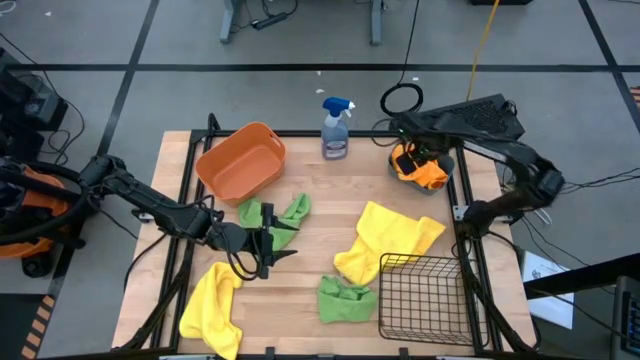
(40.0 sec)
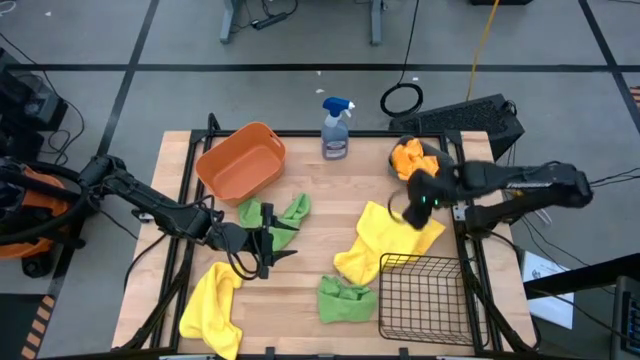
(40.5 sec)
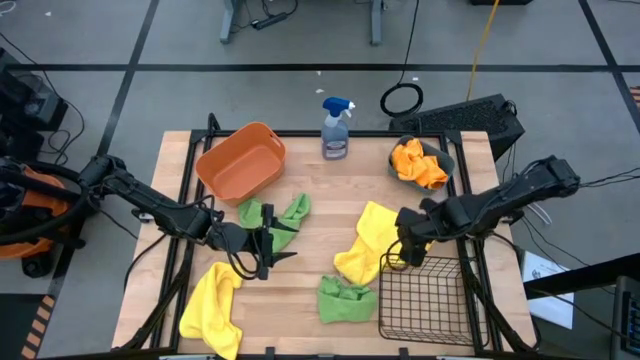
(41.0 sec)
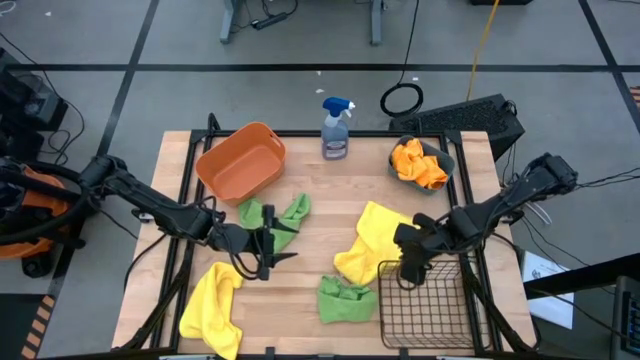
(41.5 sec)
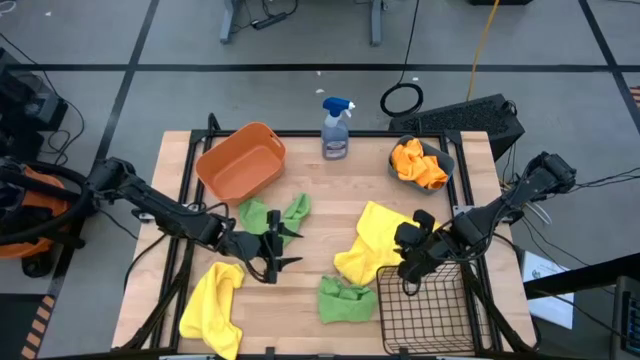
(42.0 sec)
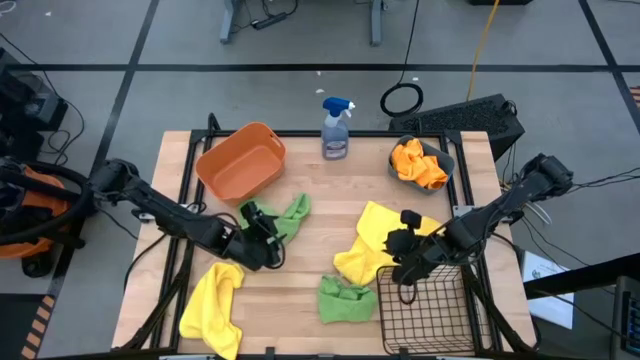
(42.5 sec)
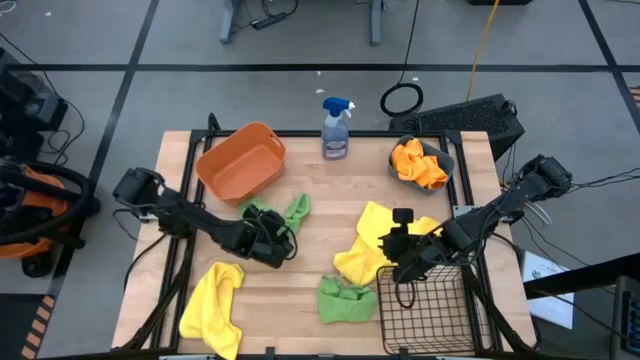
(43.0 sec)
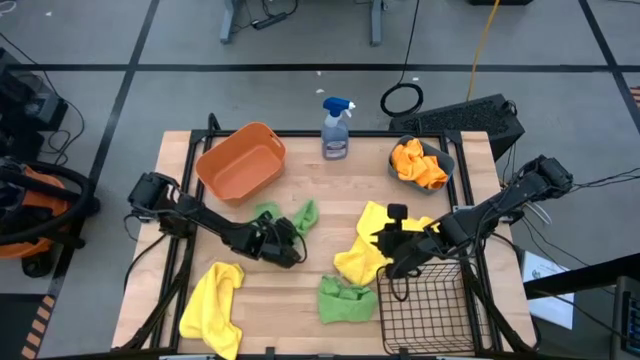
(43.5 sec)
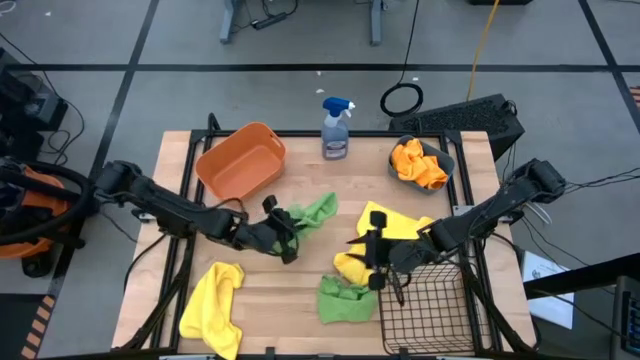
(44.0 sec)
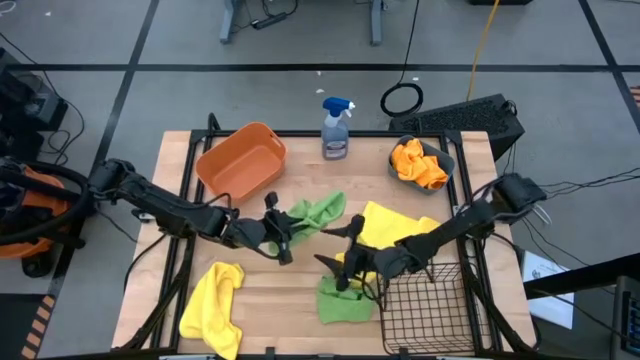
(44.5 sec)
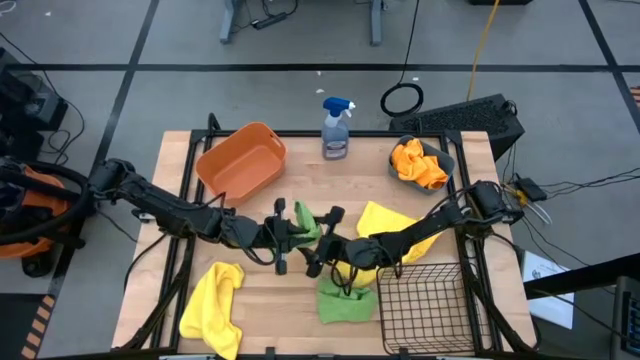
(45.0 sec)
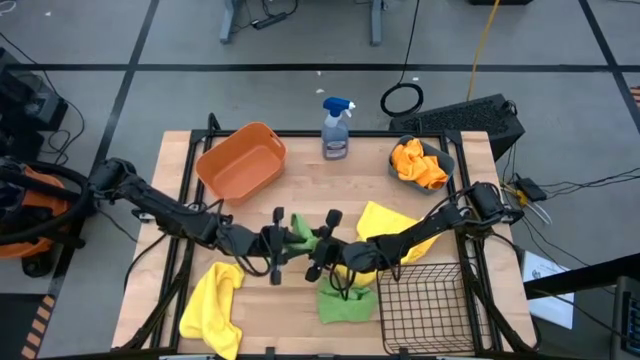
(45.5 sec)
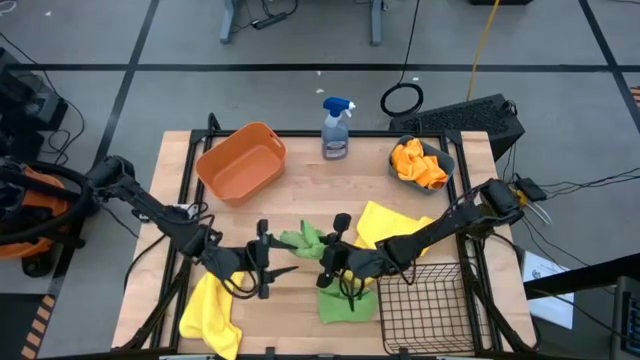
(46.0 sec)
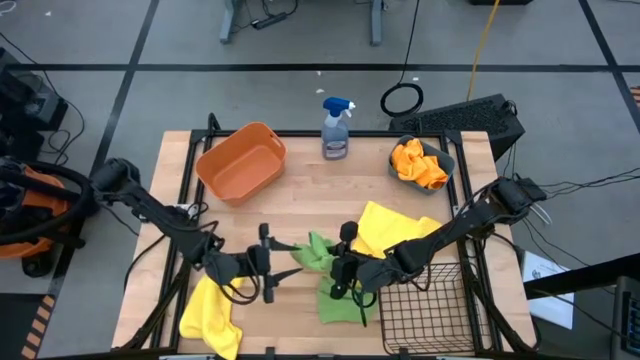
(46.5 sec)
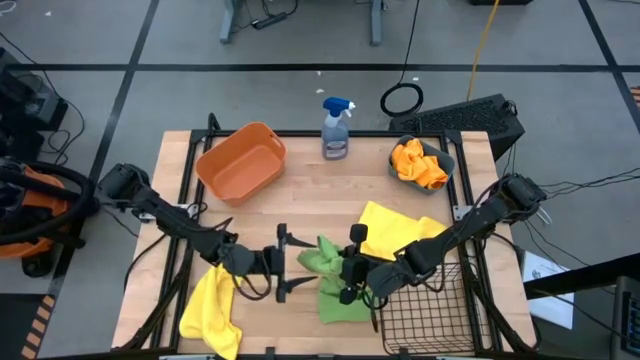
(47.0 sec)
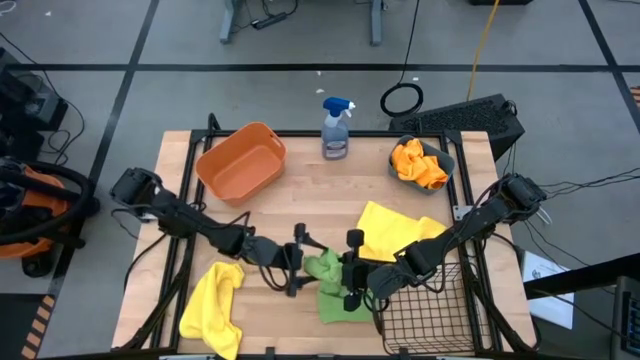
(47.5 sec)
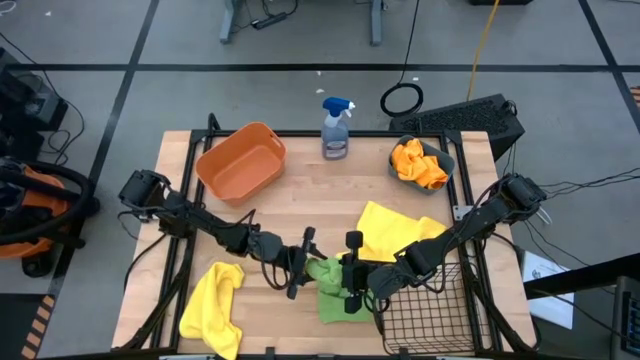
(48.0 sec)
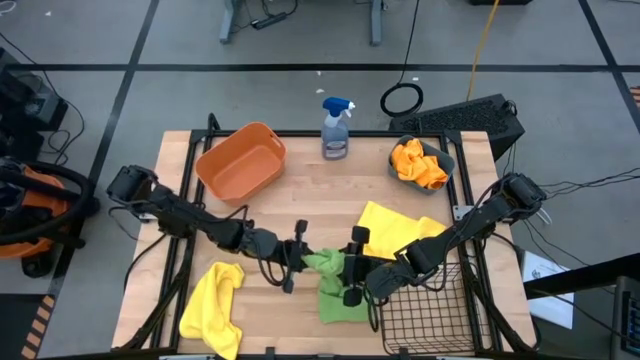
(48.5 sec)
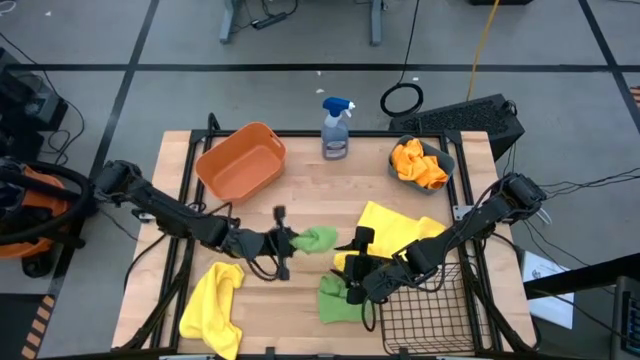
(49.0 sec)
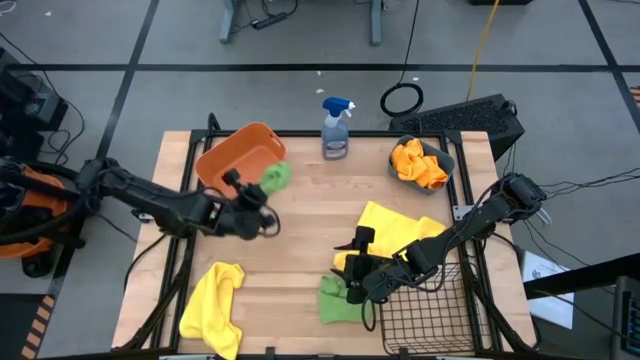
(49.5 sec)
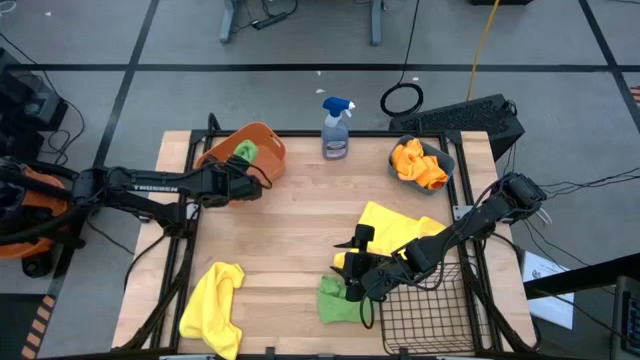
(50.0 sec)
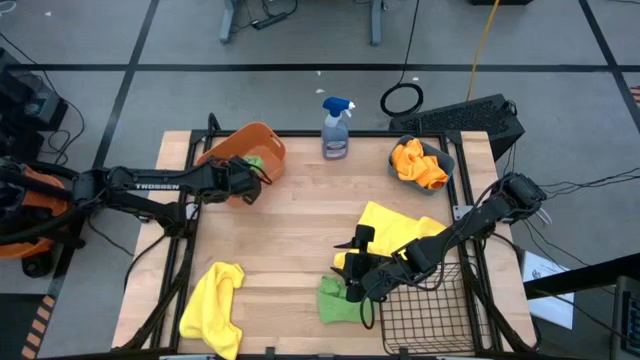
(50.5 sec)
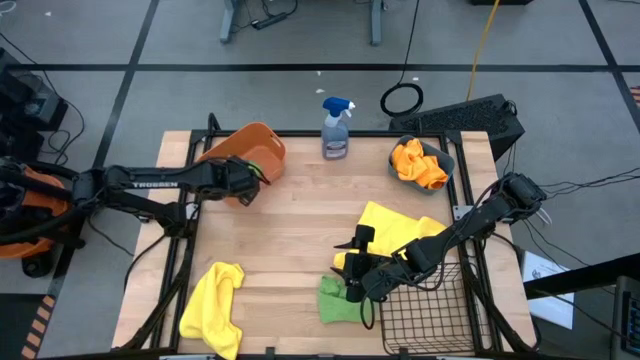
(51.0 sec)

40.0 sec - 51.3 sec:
Task: Sort microfiber towel by color & place in baskets
Put the left green microfiber towel into the orange bin

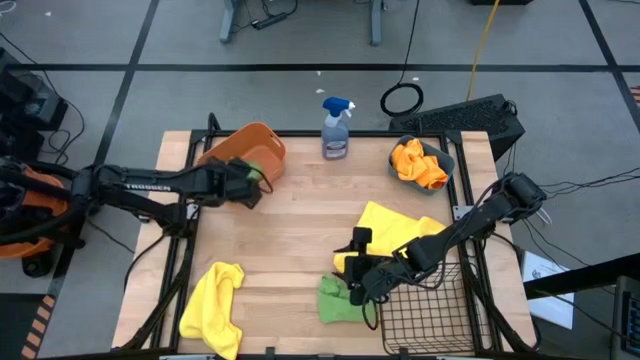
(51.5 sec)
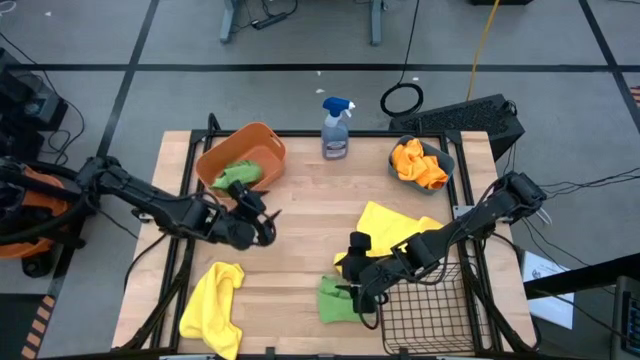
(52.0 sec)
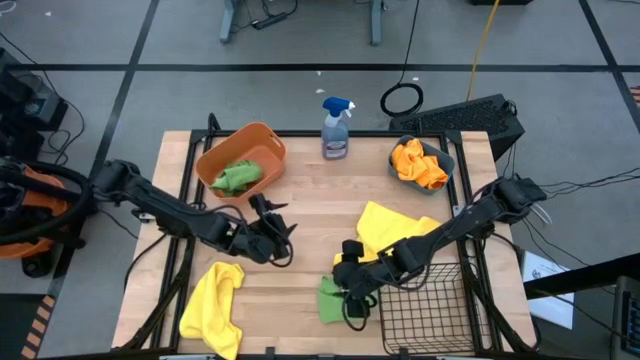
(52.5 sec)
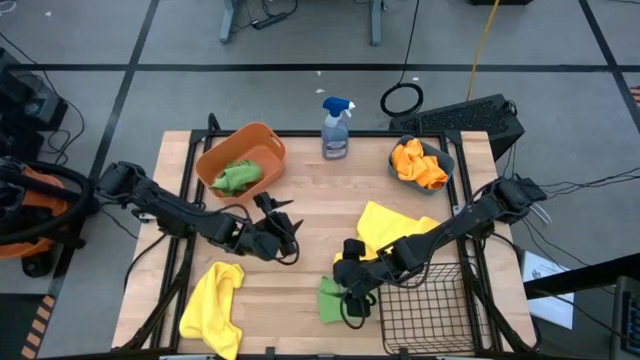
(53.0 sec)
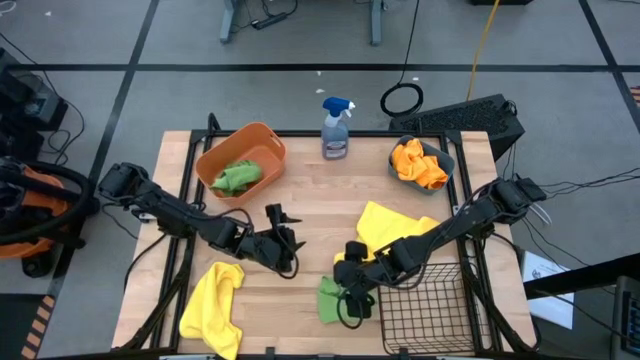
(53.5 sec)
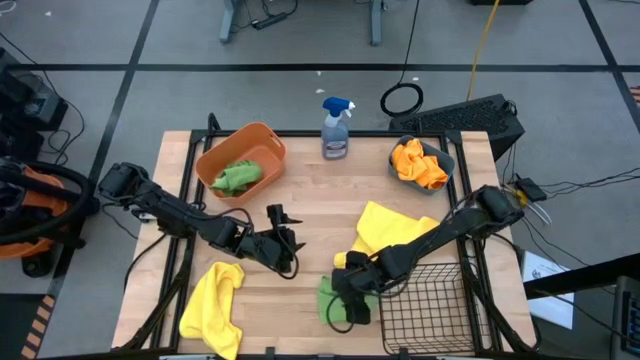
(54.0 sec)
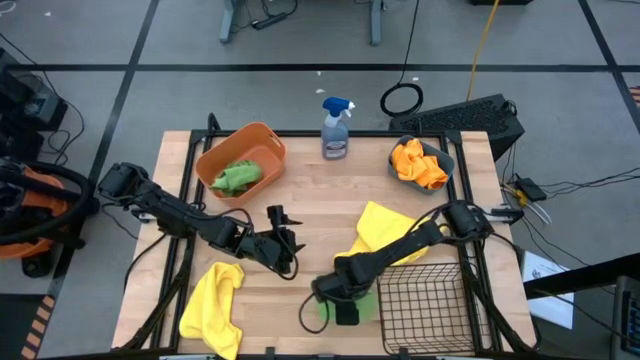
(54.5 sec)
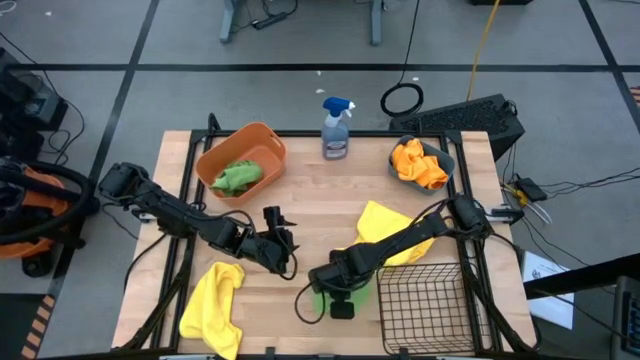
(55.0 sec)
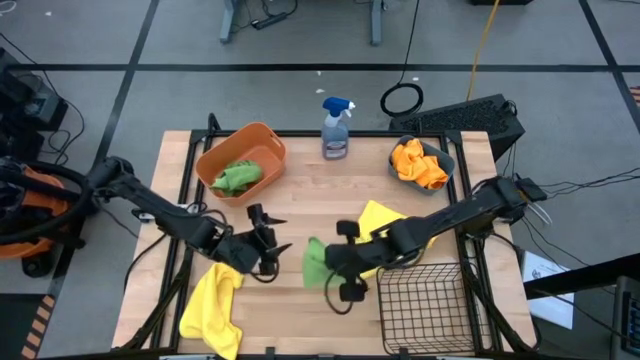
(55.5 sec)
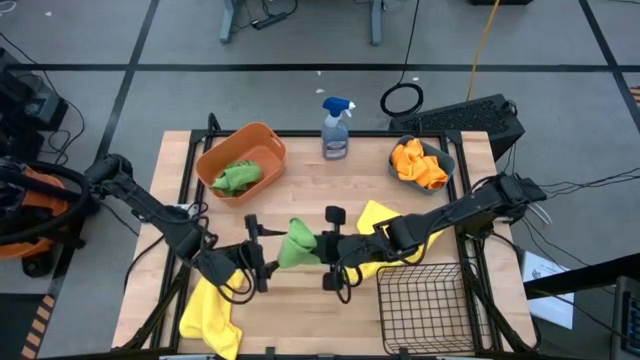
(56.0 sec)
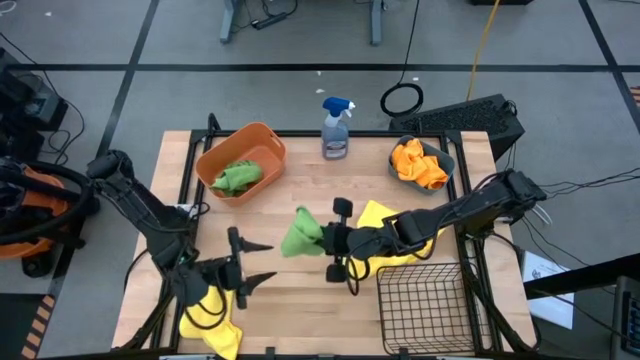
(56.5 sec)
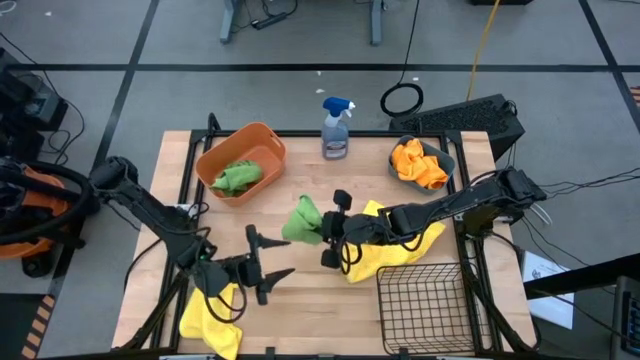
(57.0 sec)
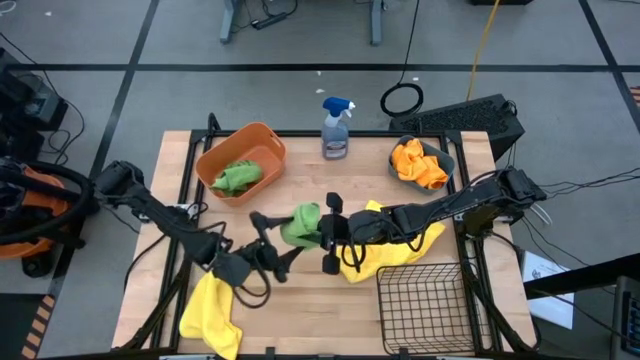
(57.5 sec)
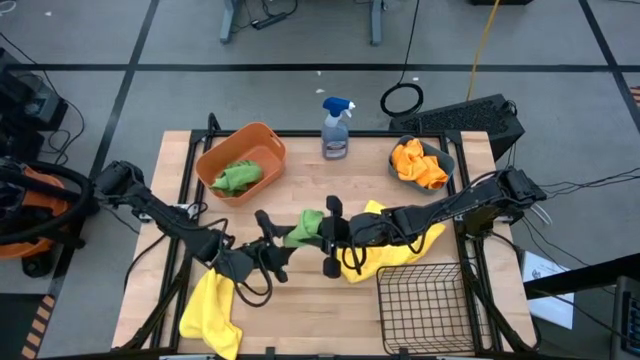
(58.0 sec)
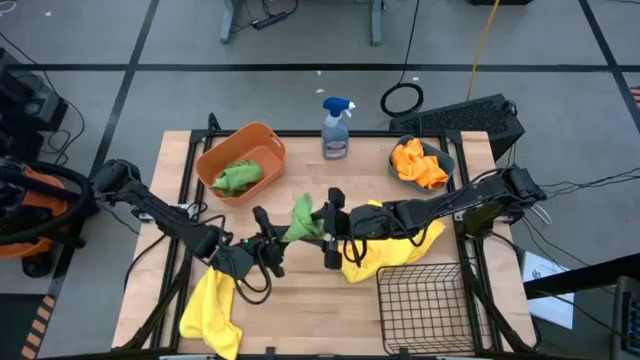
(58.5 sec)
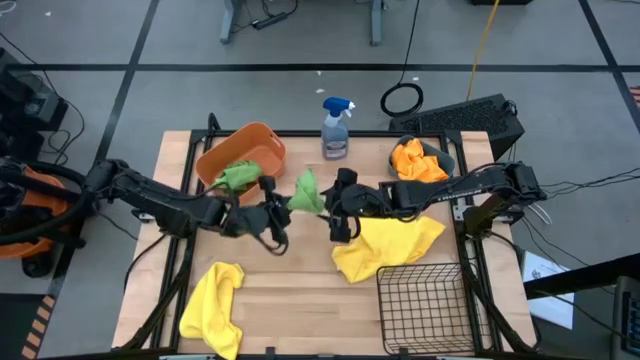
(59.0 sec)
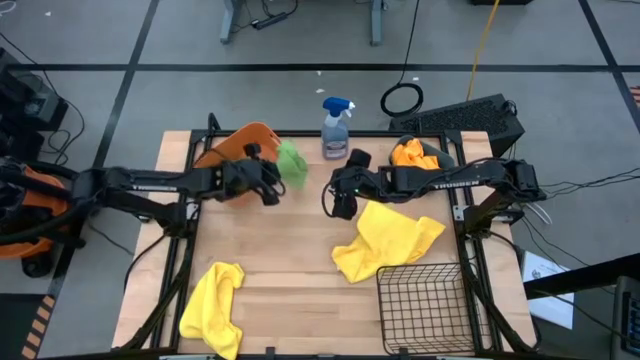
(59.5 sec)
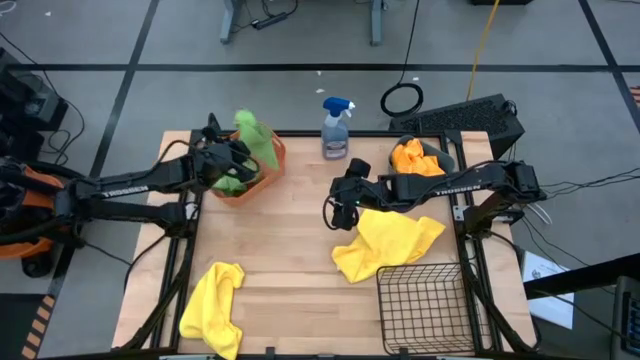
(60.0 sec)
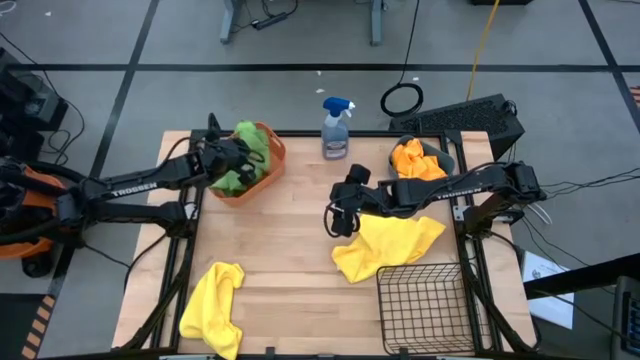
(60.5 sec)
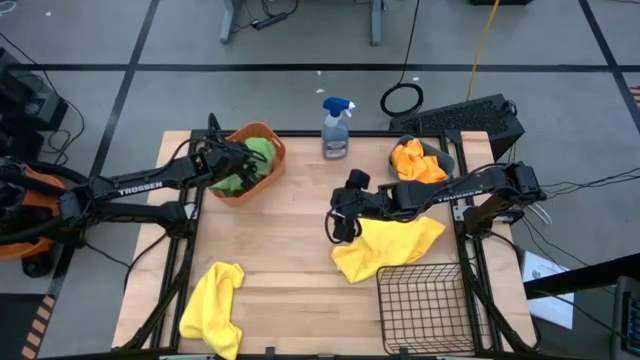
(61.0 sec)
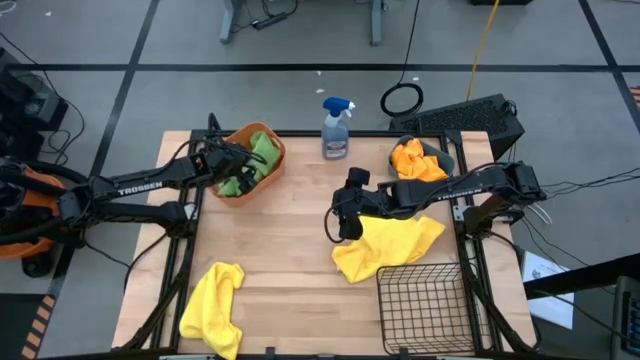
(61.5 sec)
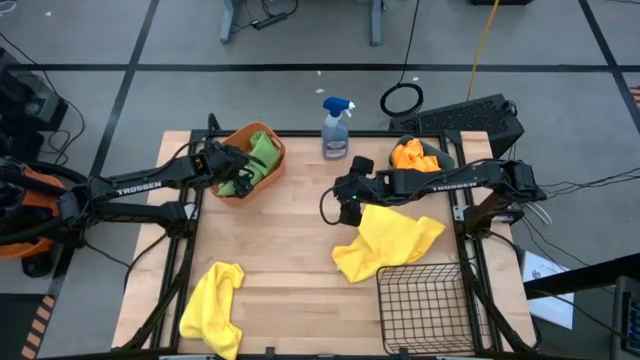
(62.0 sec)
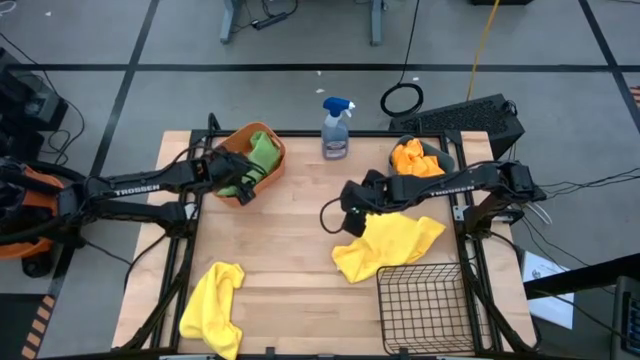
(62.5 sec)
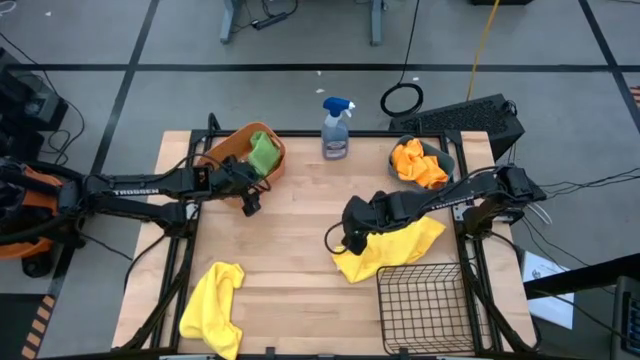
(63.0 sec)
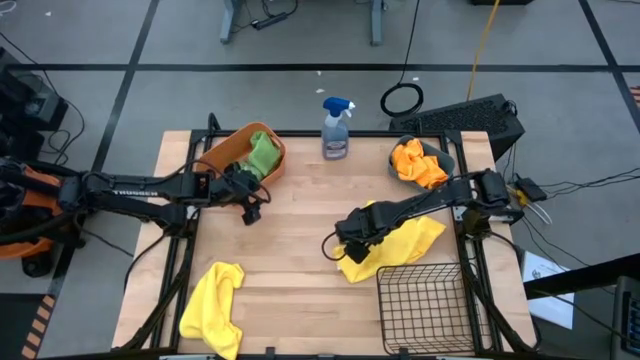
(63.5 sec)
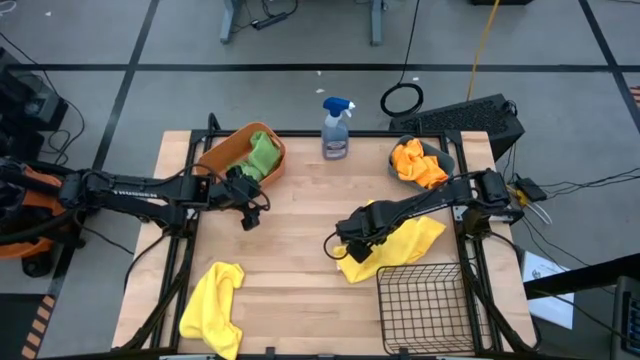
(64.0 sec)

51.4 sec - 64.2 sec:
Put the right yellow microfiber towel into the wire basket
